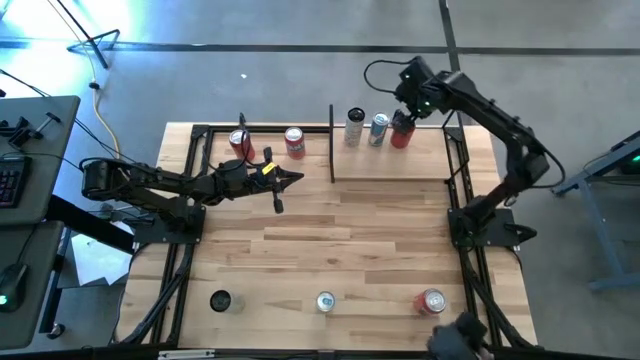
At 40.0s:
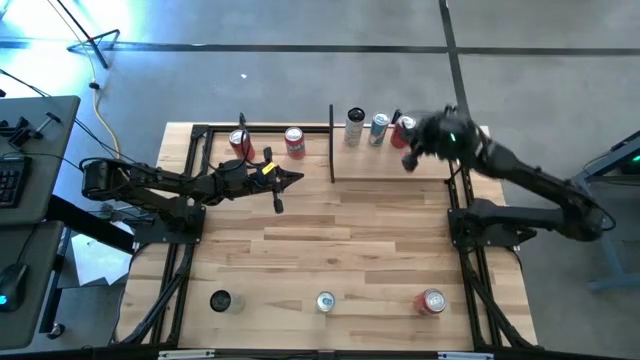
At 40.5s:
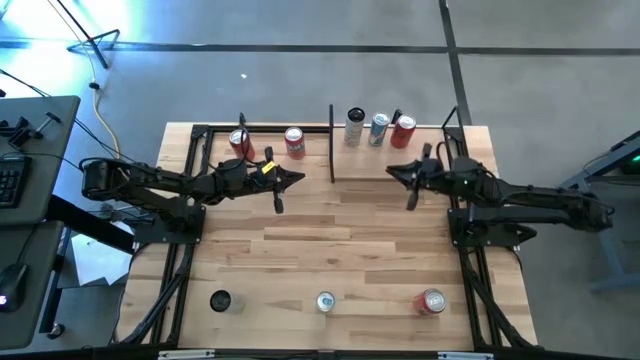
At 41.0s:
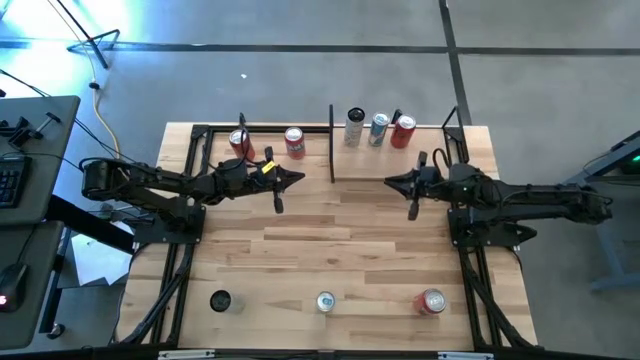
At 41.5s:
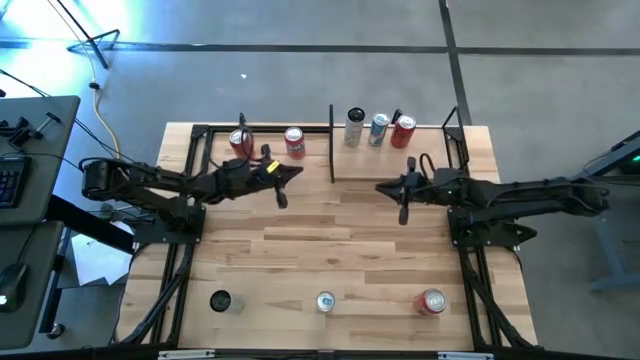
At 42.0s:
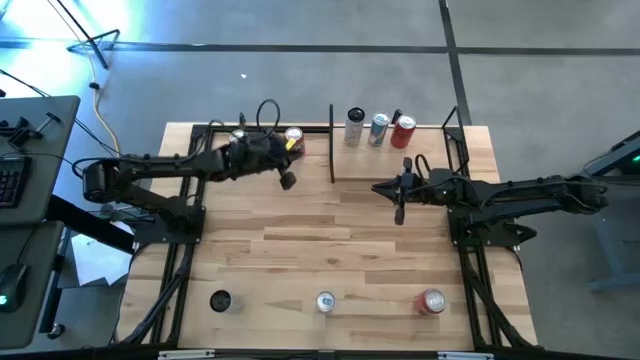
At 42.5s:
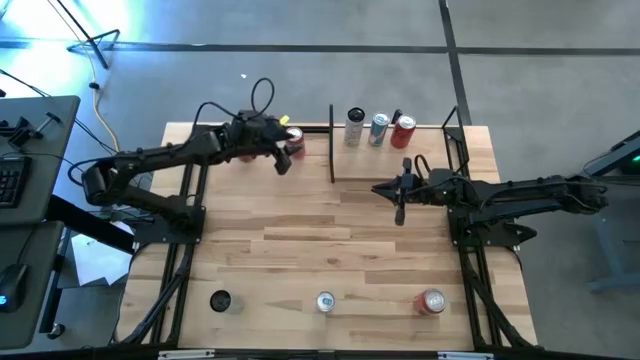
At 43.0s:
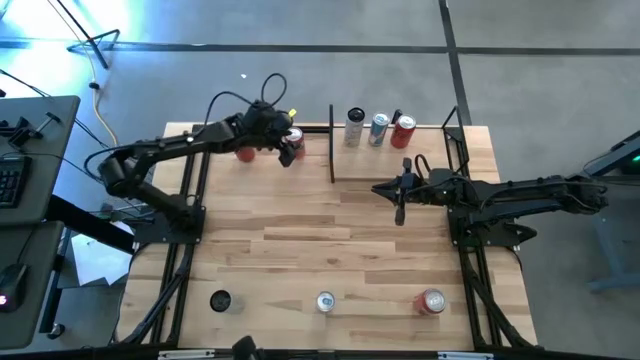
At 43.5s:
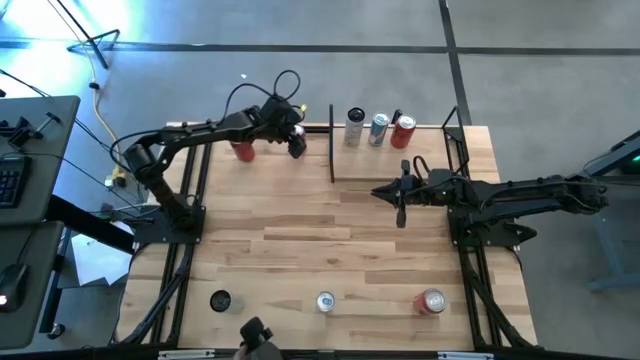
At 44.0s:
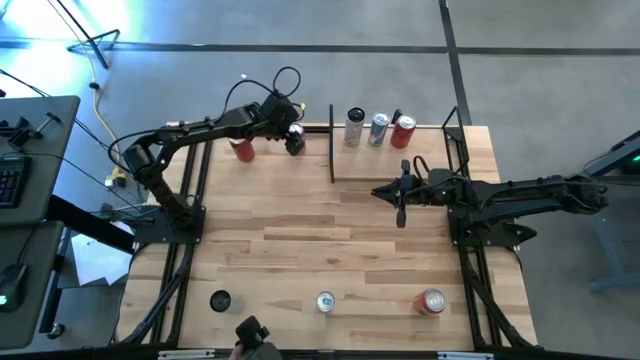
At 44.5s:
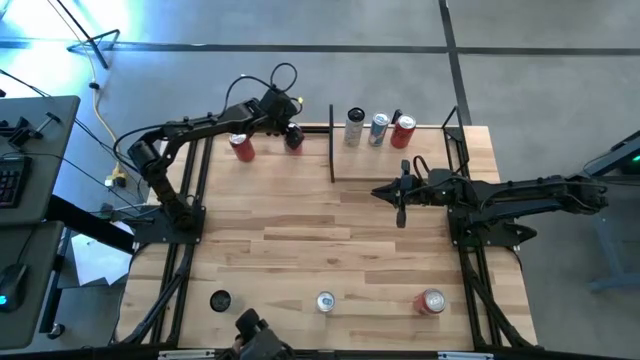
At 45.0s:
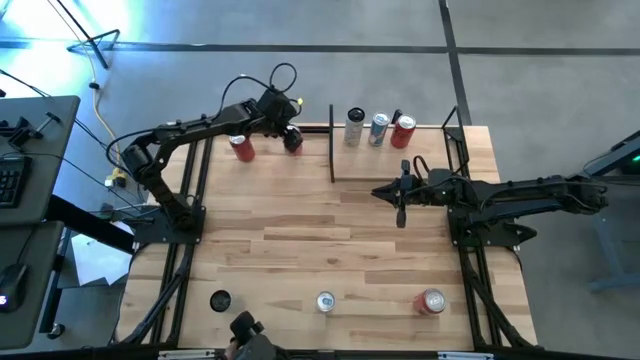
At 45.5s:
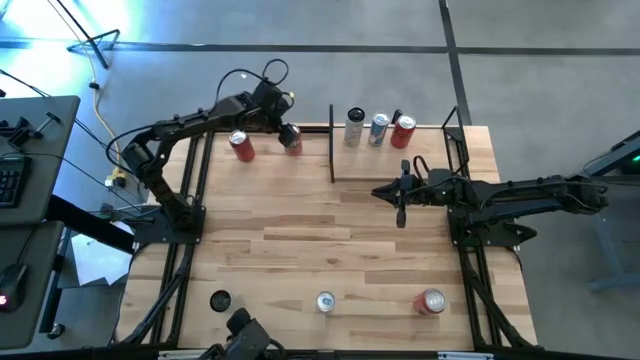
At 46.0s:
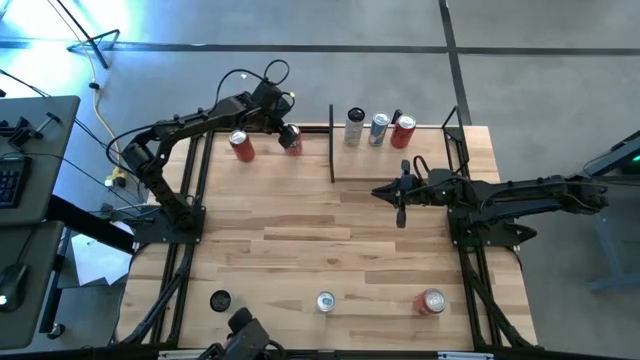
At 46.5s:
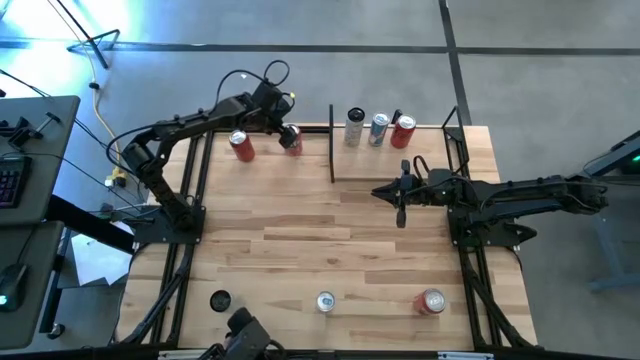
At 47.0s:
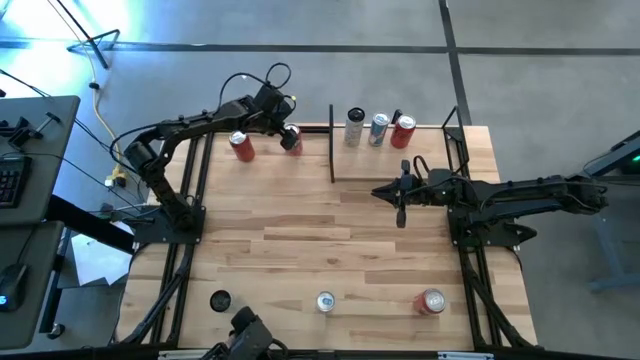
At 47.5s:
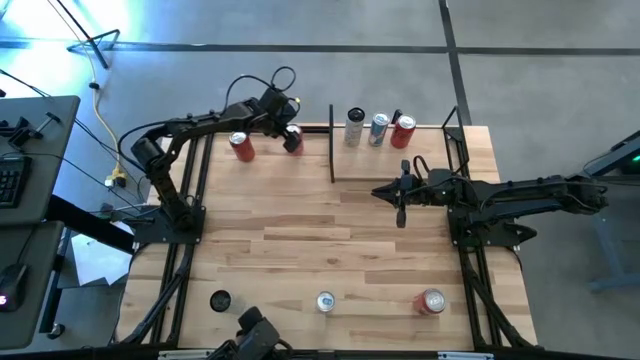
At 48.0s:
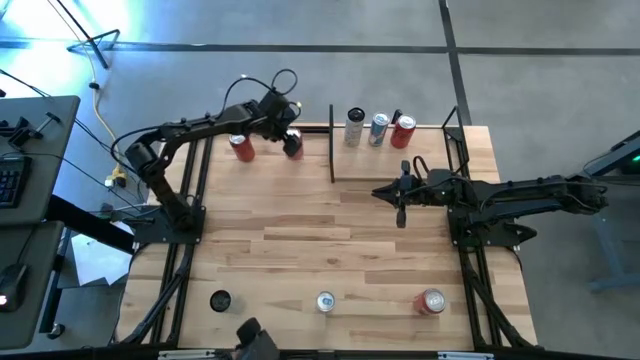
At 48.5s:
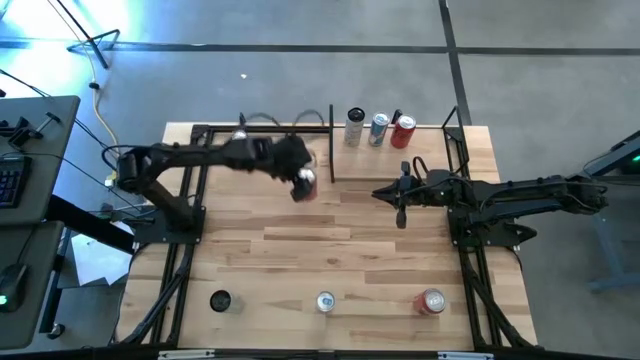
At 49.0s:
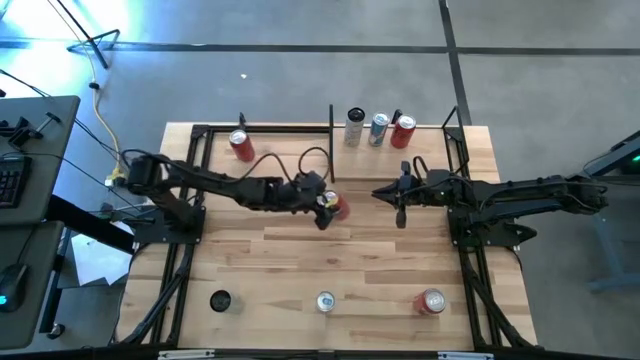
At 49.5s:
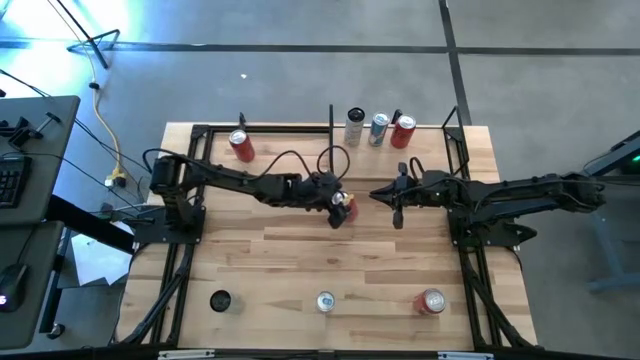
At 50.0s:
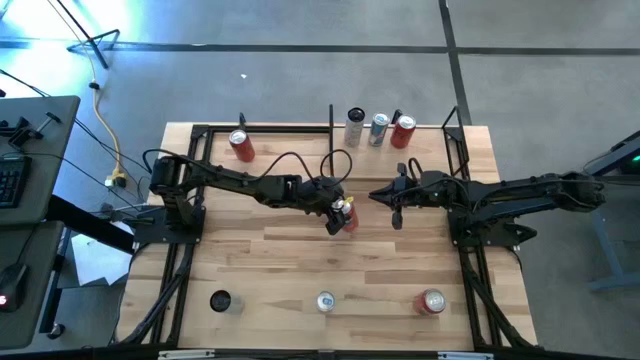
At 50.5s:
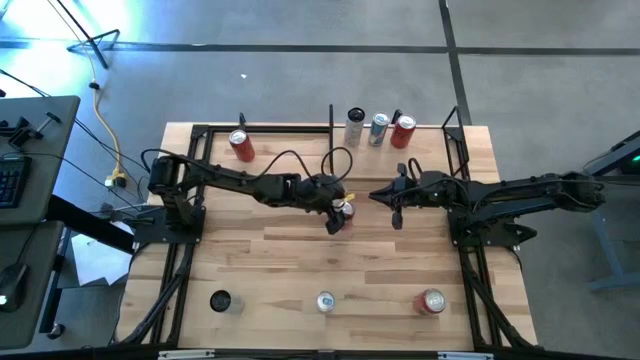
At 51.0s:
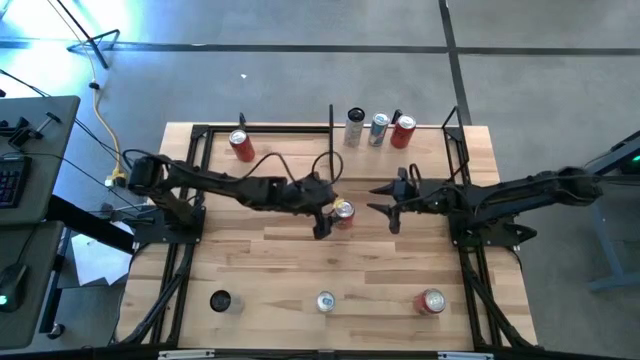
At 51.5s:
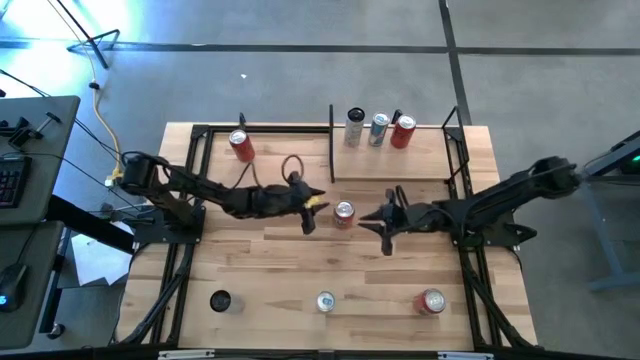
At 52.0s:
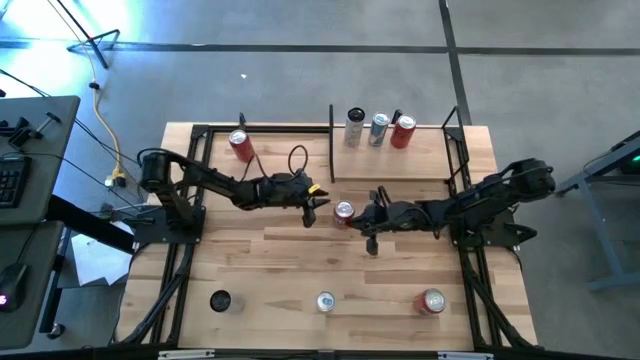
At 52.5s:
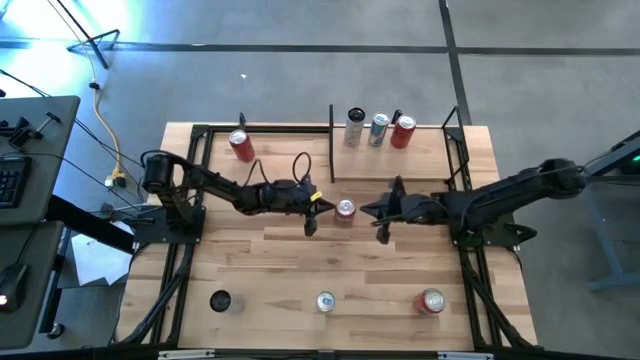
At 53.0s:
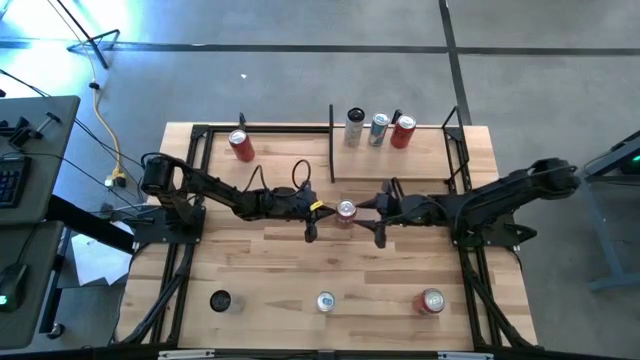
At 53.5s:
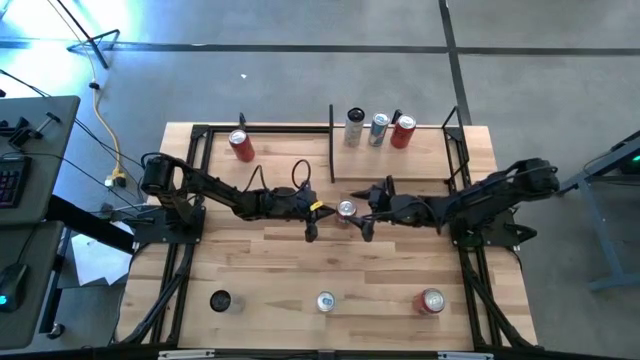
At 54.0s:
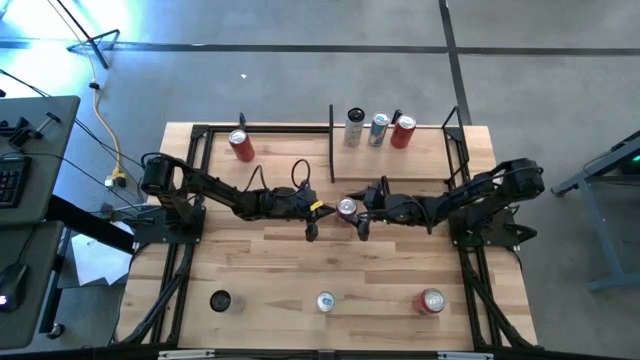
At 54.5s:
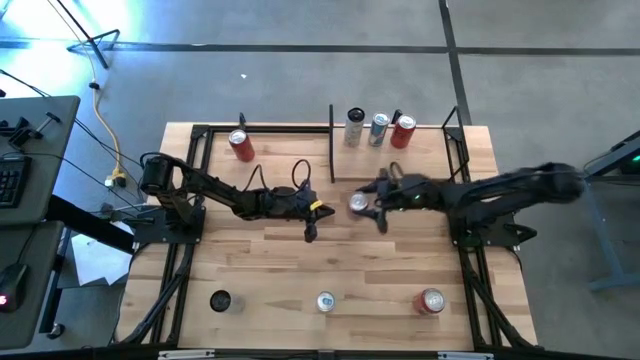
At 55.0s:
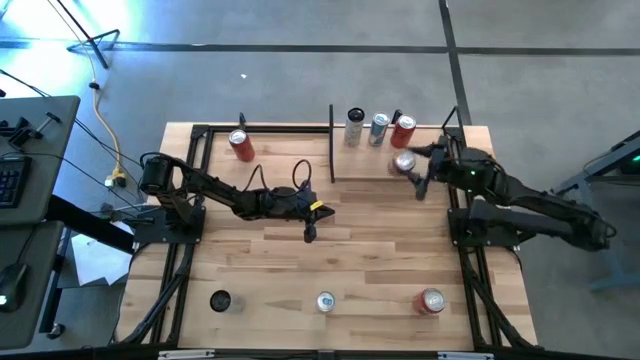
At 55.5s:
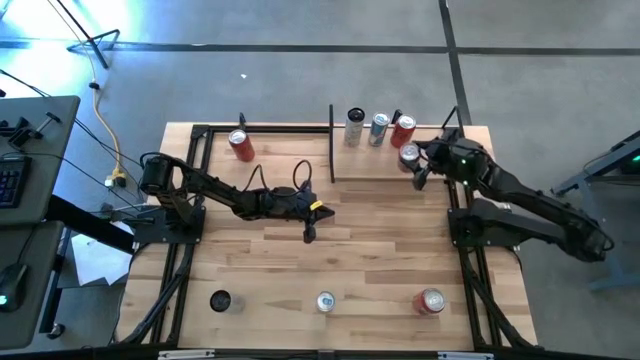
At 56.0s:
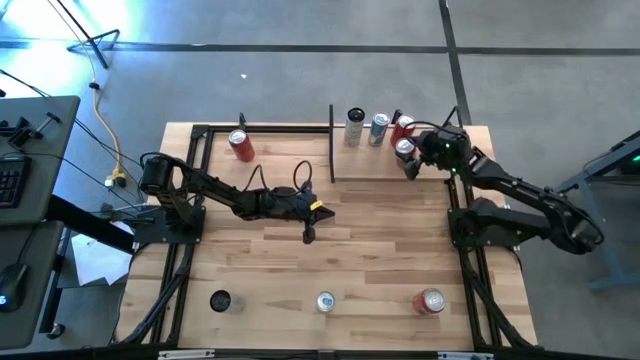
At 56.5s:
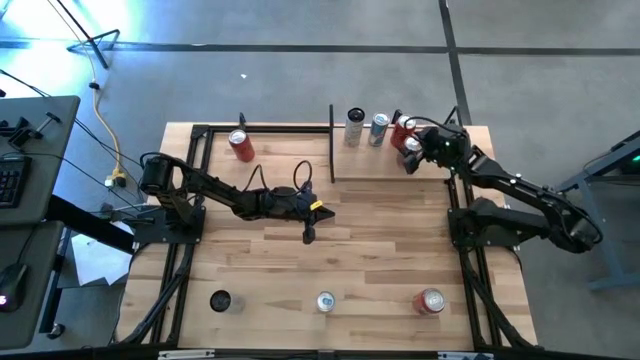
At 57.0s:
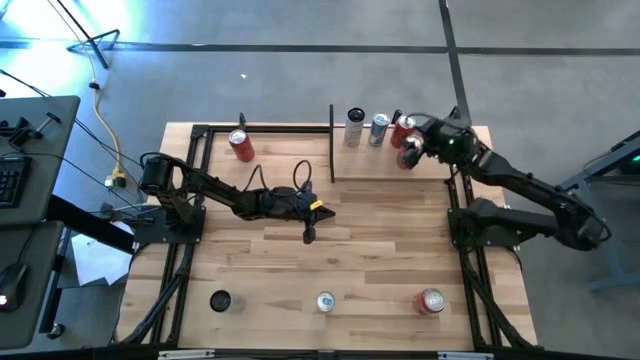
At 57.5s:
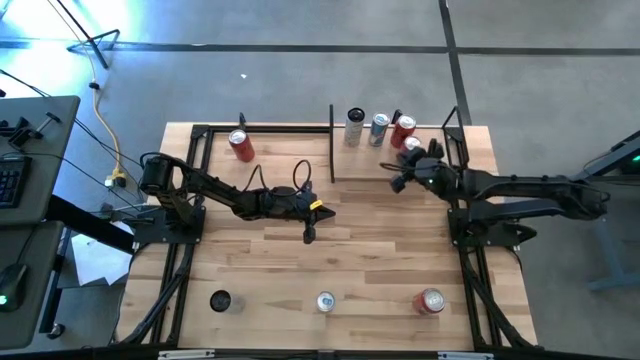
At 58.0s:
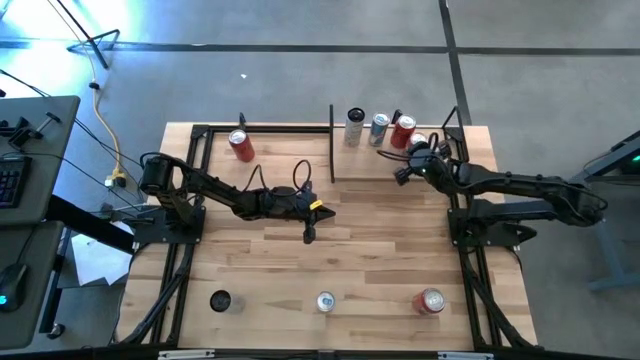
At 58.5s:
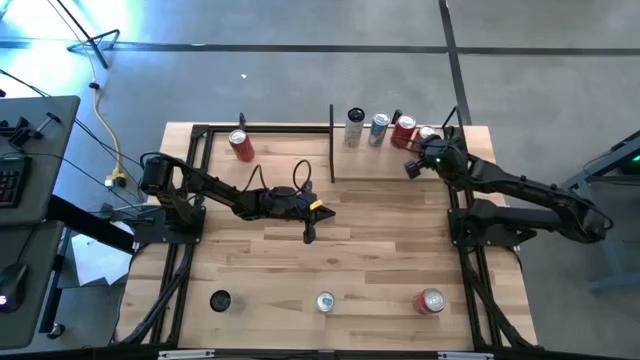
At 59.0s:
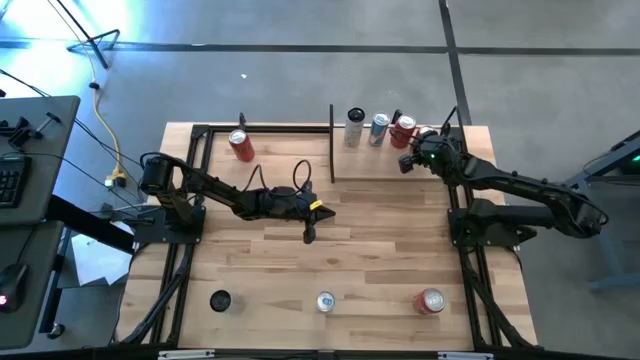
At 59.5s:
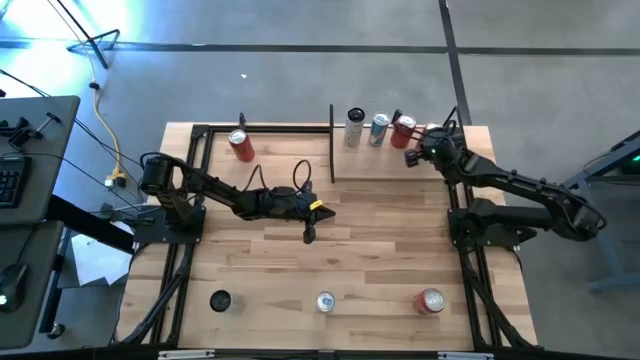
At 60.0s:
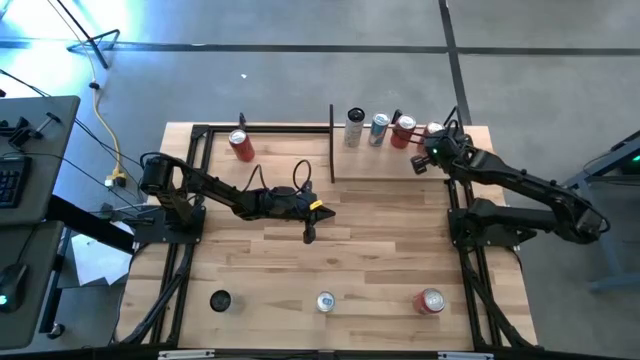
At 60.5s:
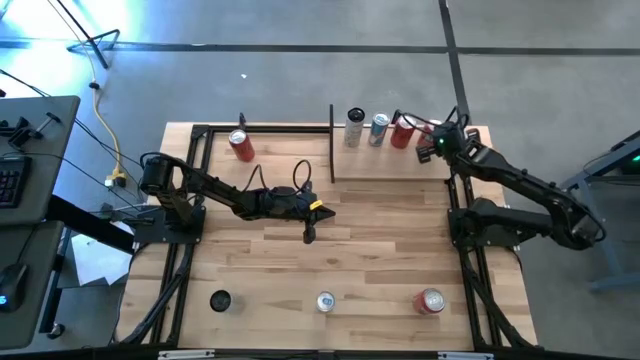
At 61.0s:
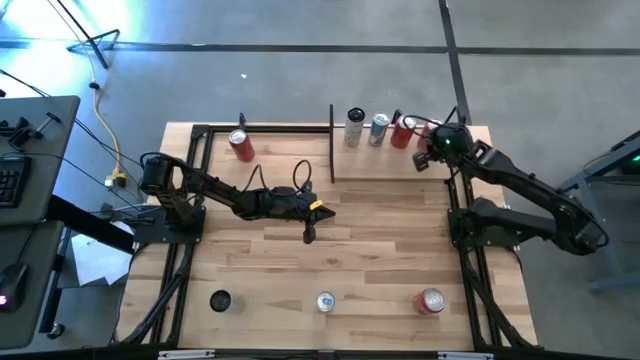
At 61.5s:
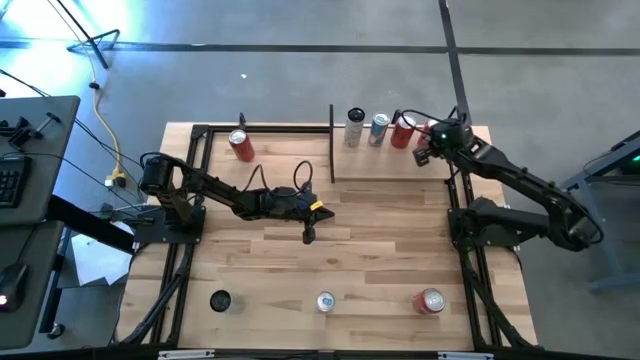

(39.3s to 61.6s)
Task: Place canned beverage on shelf
Put the top orange soda can on the shelf
